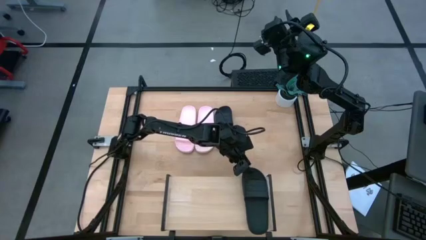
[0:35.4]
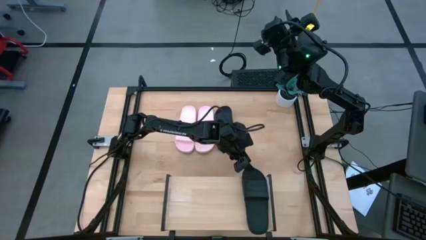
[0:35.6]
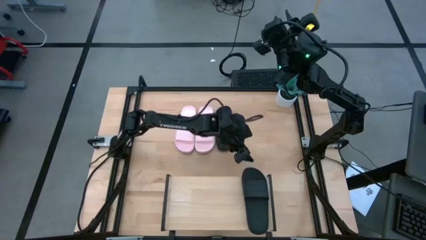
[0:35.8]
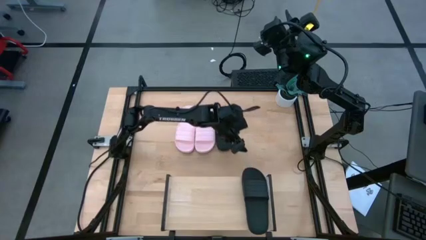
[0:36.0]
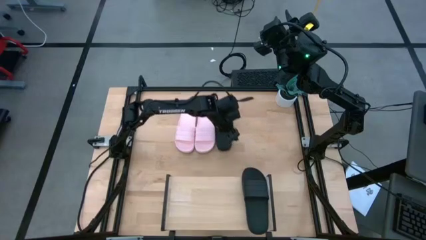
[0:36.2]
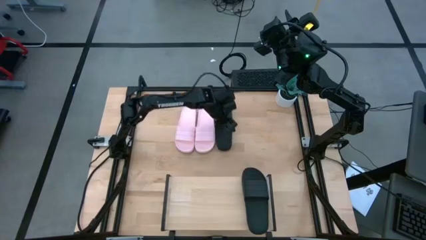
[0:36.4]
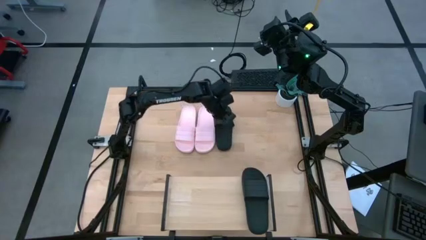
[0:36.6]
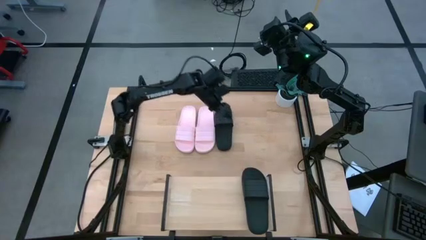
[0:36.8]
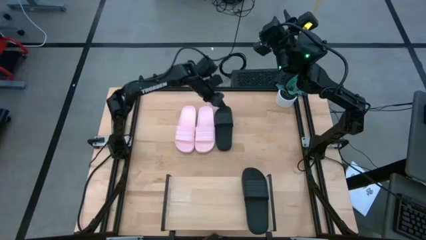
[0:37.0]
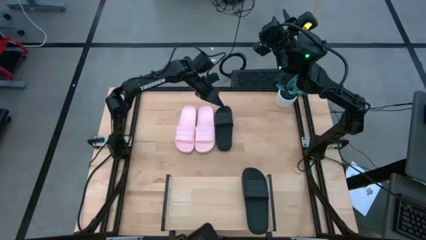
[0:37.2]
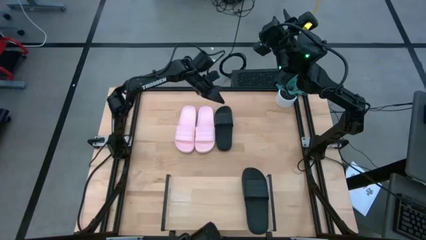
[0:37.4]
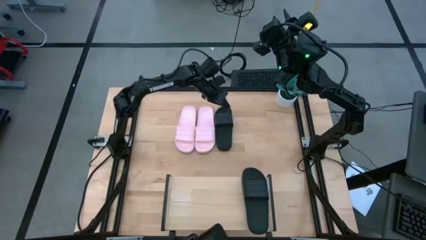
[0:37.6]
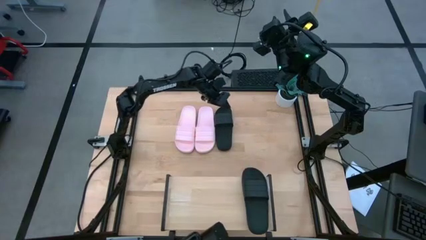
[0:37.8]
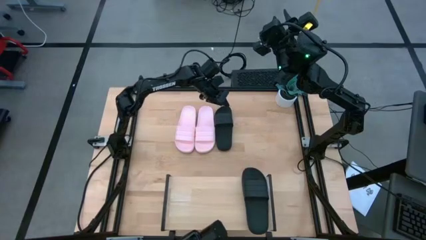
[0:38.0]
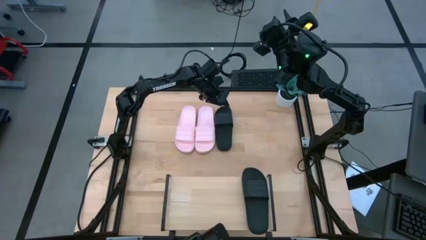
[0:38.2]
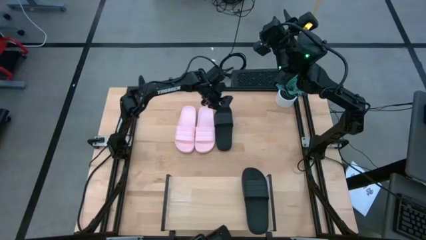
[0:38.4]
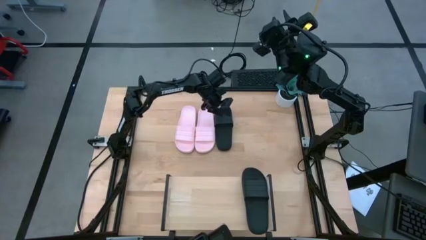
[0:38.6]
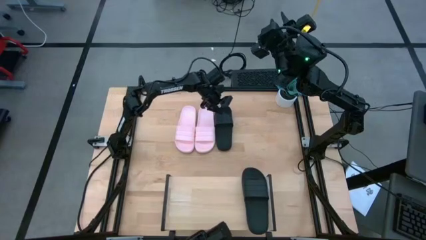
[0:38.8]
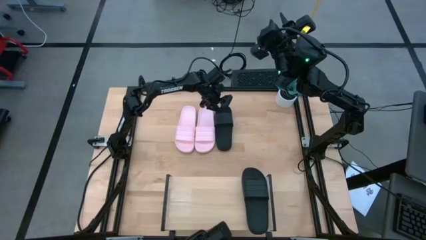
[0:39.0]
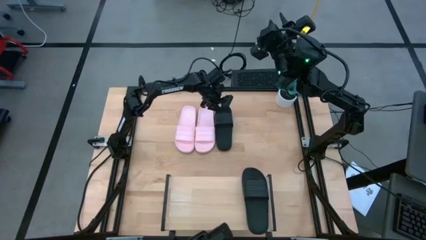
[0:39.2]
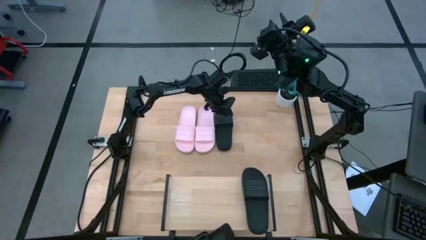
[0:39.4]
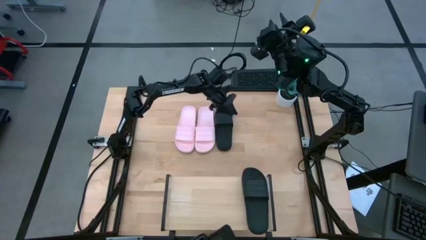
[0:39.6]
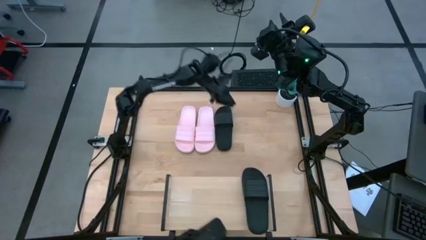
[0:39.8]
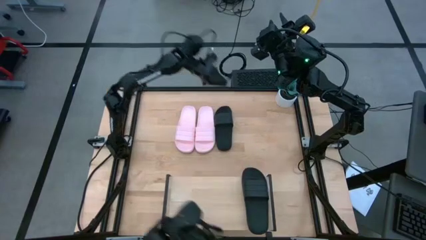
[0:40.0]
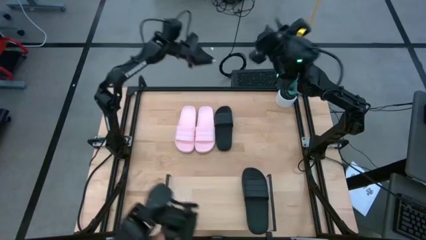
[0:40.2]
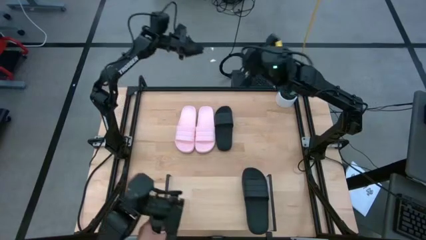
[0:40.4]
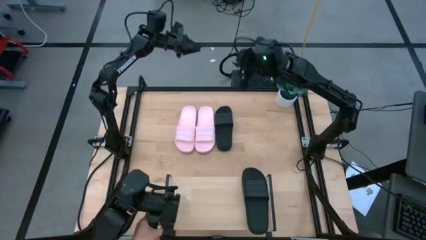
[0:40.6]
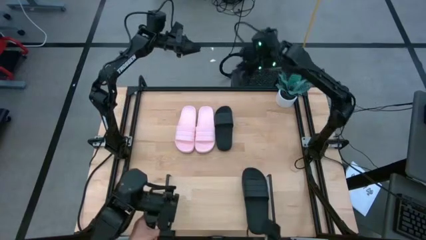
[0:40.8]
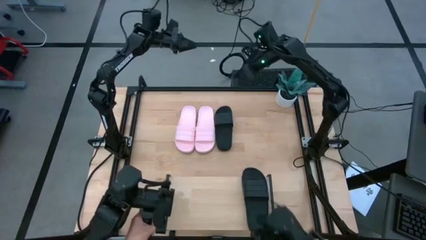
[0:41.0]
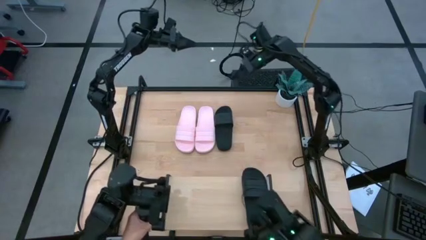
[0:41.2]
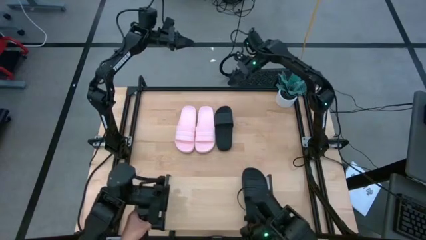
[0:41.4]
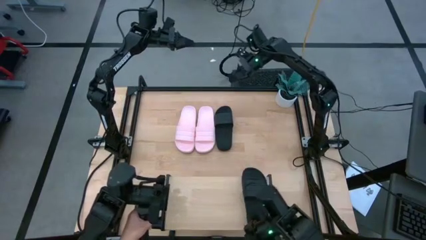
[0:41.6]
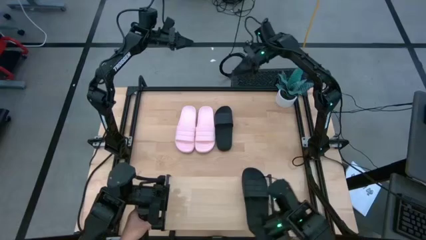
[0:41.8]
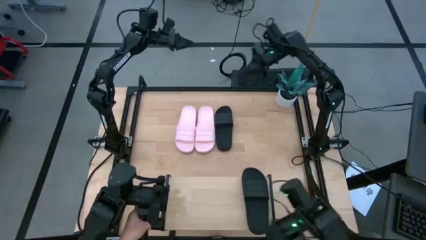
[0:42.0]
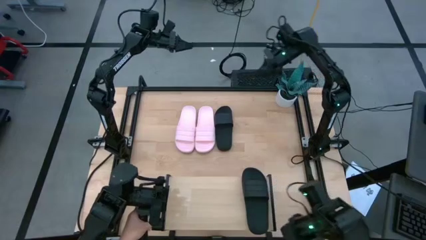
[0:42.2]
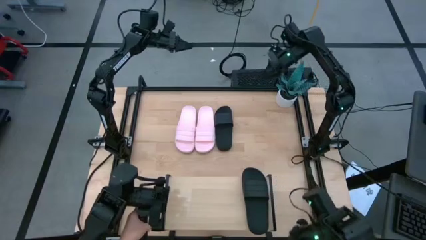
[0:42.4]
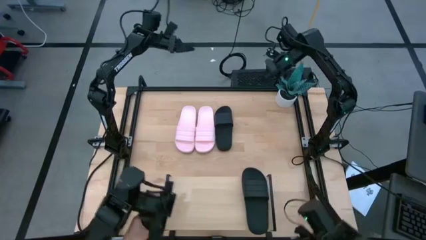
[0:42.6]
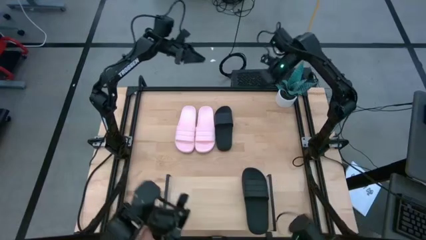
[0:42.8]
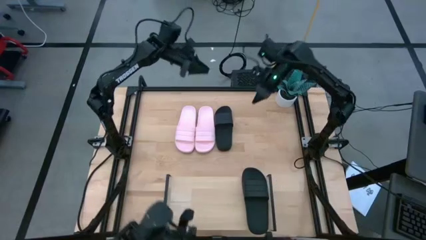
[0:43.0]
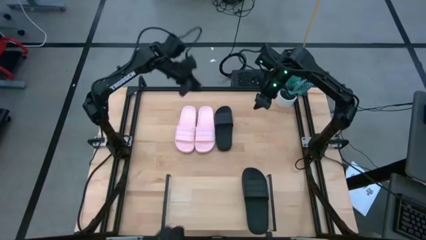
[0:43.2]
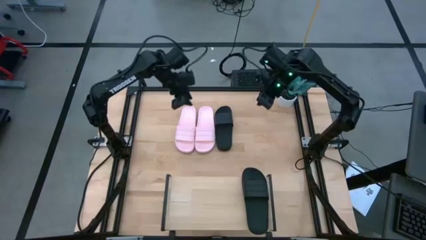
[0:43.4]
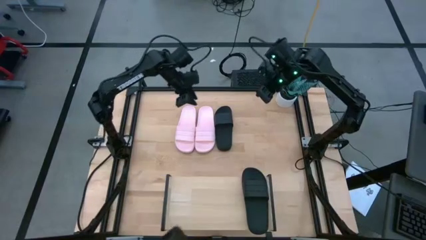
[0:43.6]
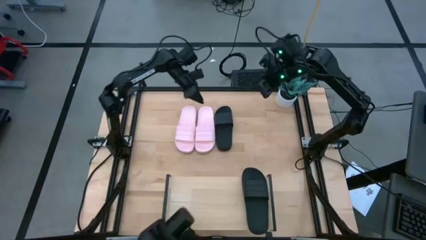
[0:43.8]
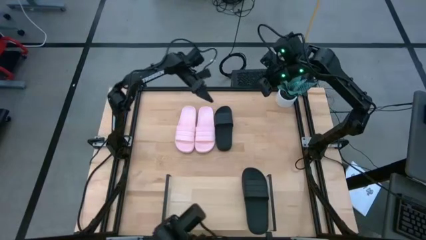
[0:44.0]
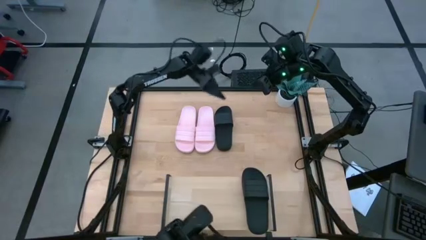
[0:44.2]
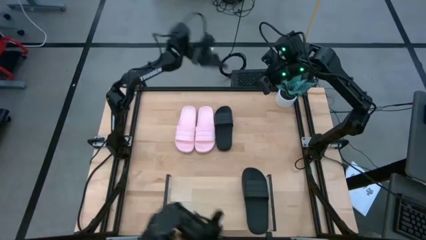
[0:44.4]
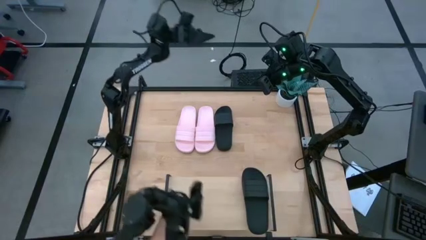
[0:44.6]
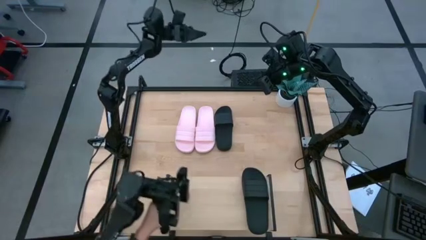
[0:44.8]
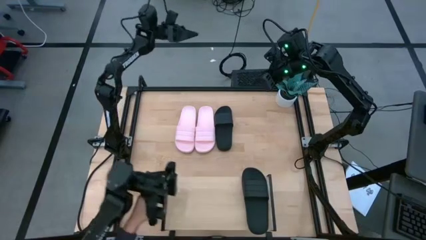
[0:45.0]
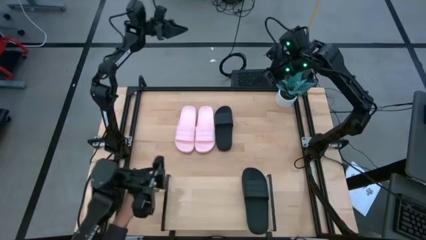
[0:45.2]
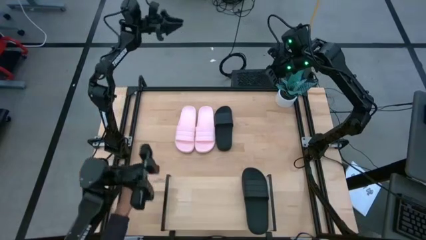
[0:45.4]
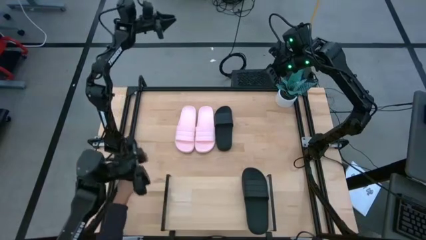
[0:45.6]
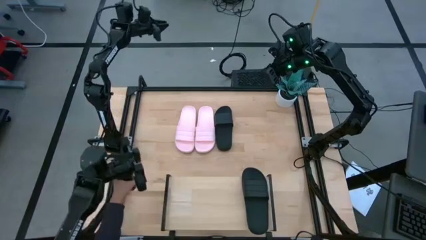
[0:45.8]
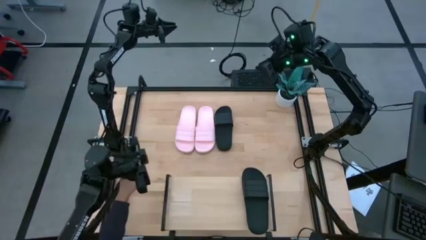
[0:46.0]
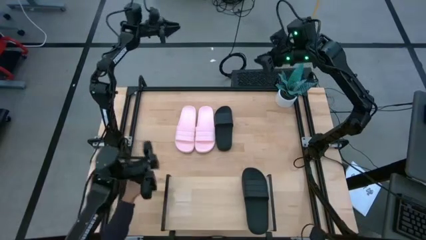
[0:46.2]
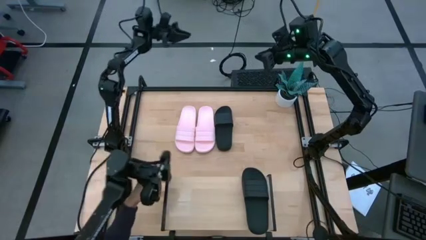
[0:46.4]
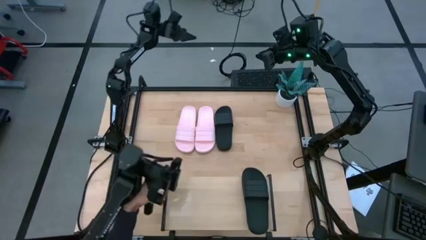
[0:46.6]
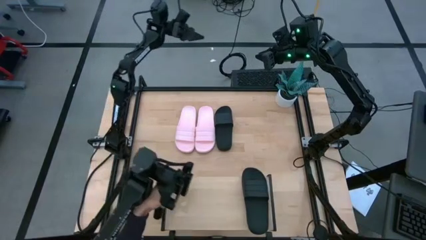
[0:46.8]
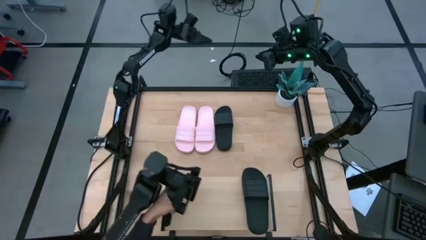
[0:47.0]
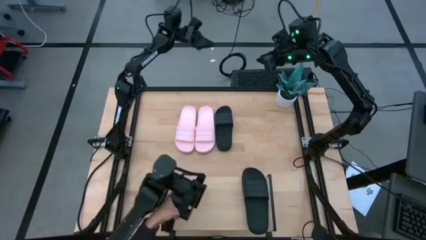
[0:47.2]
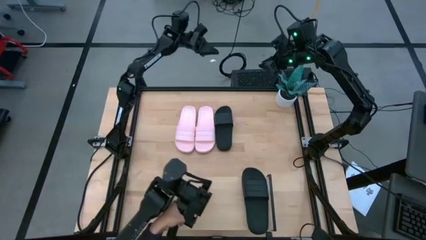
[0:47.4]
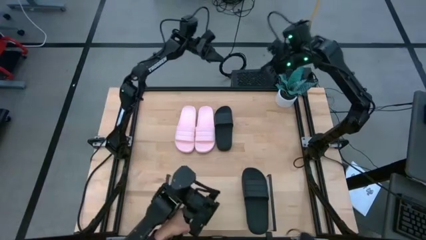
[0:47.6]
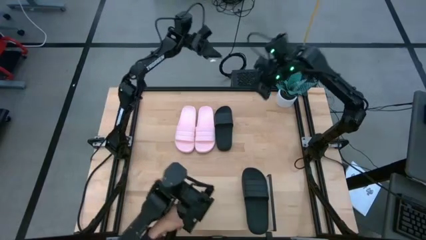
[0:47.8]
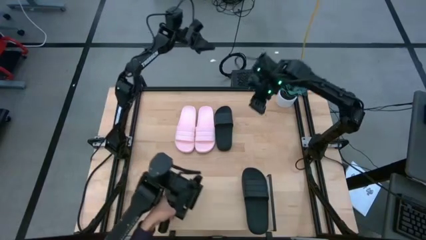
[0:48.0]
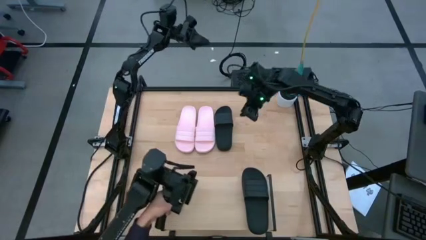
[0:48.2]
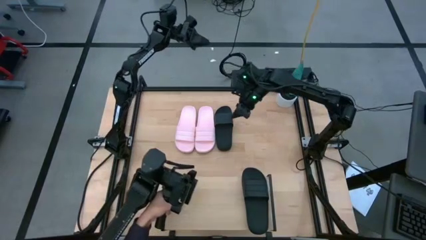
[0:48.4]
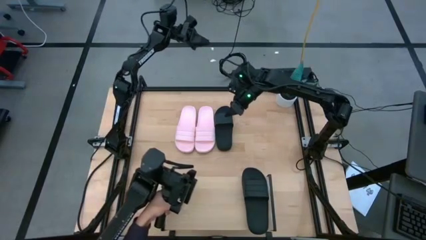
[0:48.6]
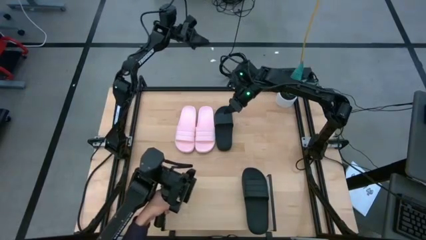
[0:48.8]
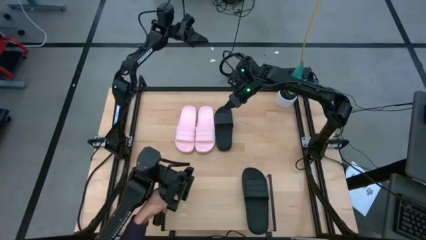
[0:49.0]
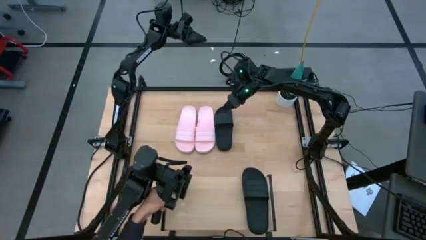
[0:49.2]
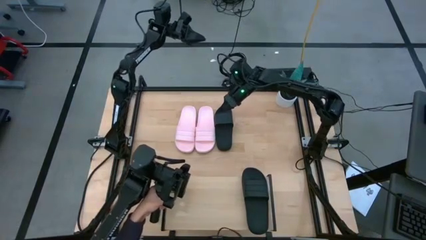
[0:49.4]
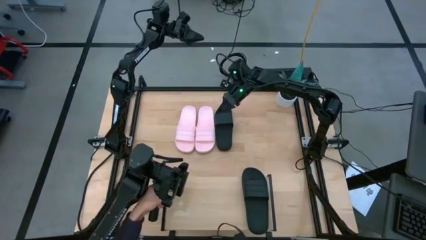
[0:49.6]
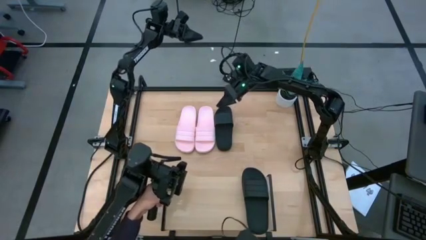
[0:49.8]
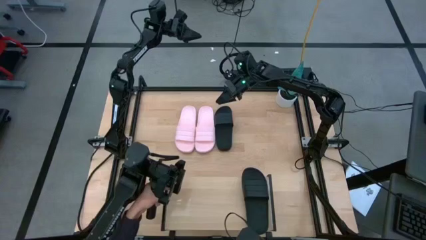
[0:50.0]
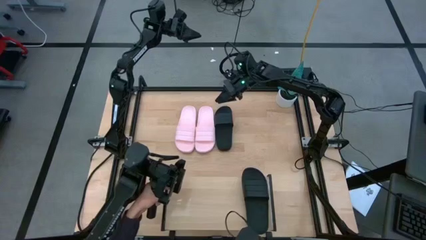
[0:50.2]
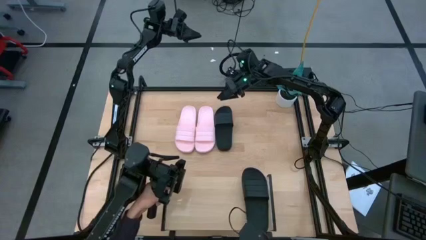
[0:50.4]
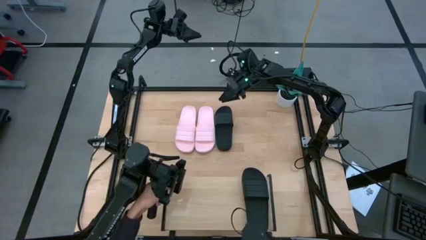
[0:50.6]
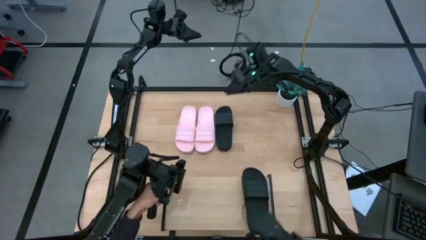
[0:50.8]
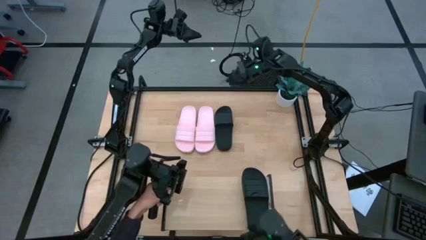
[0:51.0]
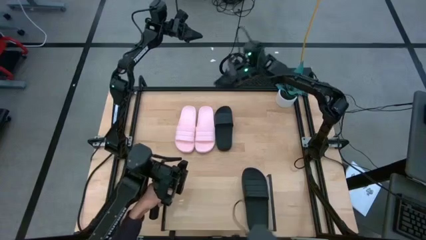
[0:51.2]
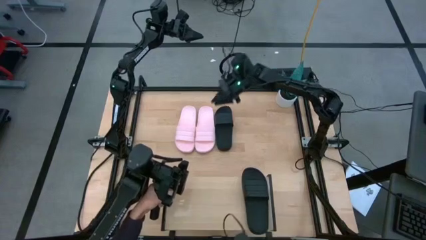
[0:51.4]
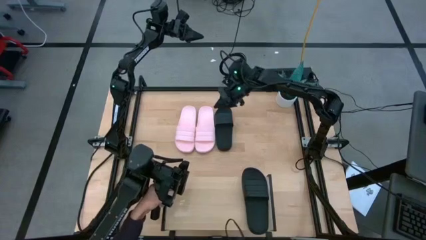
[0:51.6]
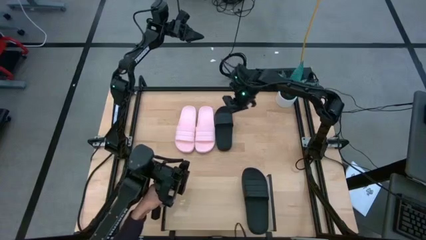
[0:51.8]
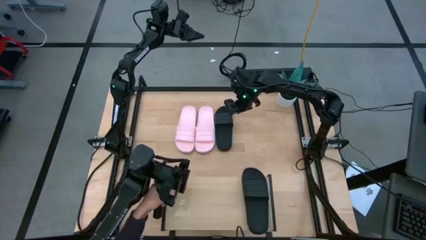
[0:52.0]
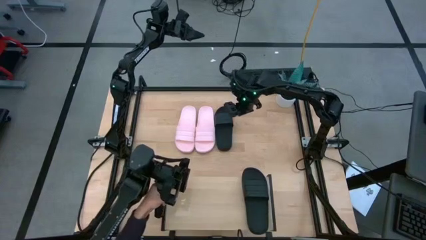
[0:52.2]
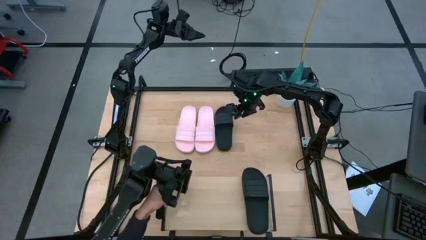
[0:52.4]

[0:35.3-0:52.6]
Task: Pick and place slides into the shelf
Put the black slipper on the shelf
